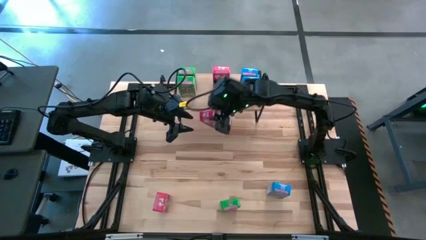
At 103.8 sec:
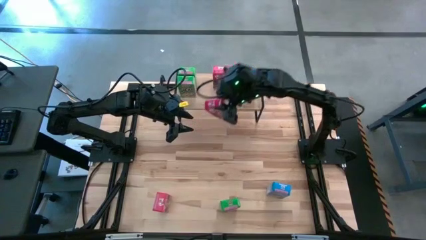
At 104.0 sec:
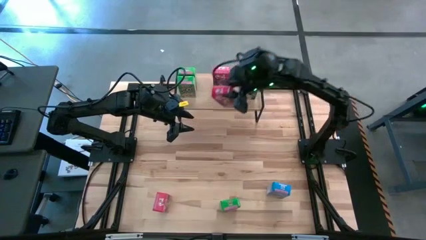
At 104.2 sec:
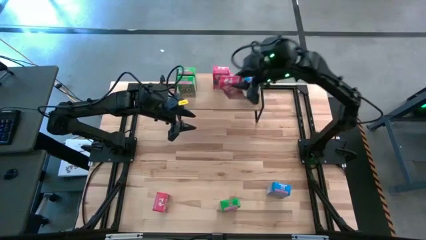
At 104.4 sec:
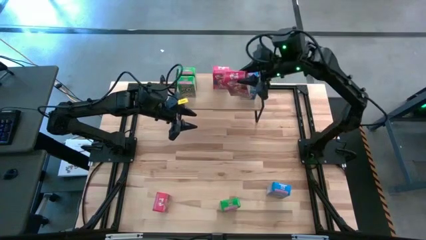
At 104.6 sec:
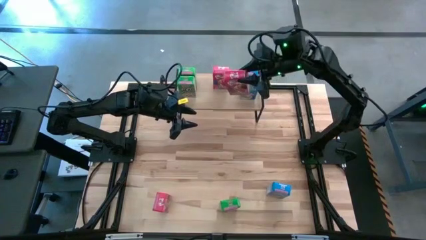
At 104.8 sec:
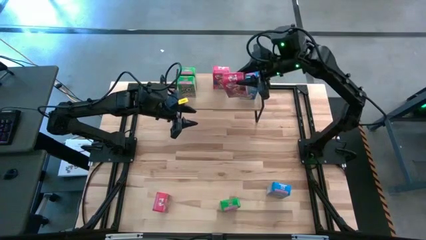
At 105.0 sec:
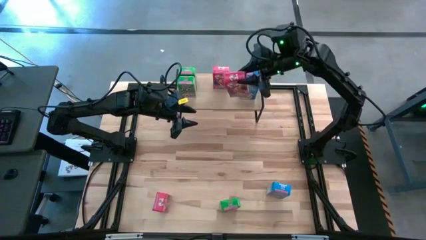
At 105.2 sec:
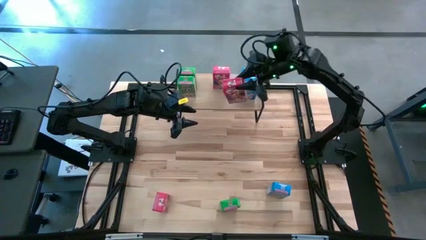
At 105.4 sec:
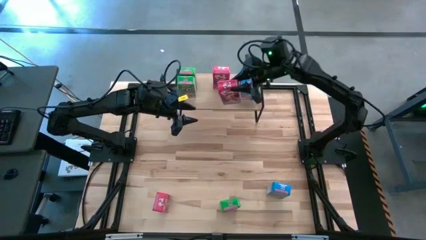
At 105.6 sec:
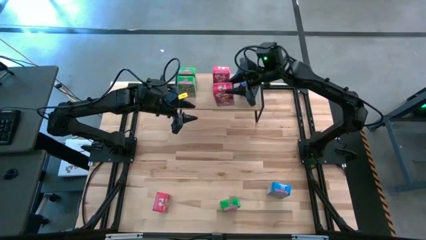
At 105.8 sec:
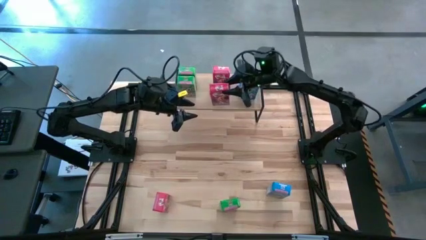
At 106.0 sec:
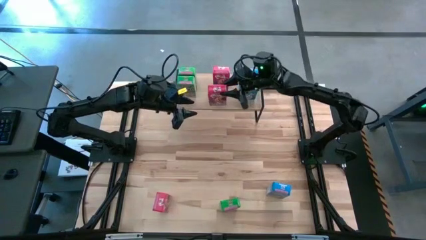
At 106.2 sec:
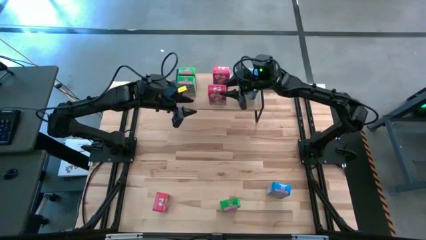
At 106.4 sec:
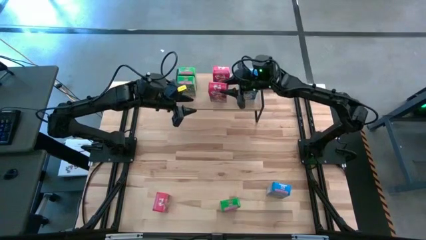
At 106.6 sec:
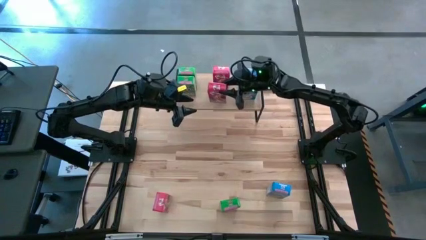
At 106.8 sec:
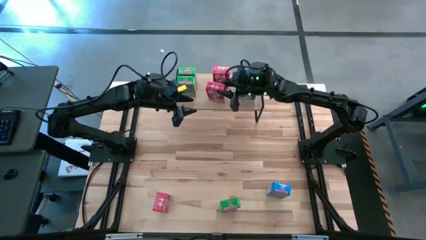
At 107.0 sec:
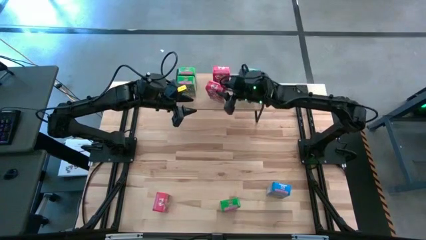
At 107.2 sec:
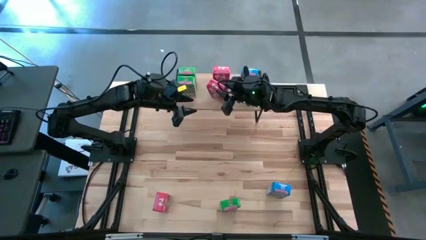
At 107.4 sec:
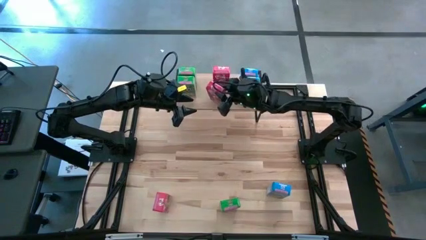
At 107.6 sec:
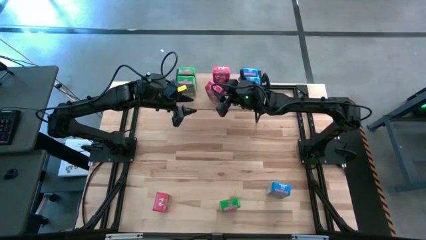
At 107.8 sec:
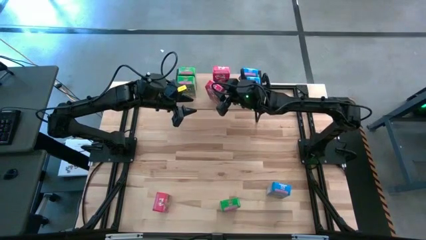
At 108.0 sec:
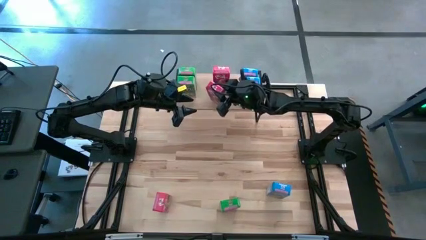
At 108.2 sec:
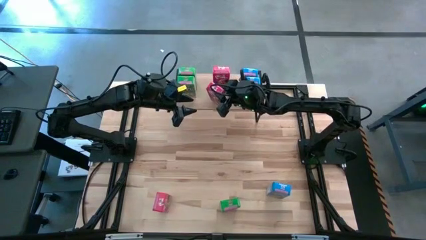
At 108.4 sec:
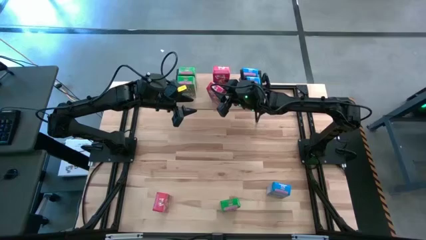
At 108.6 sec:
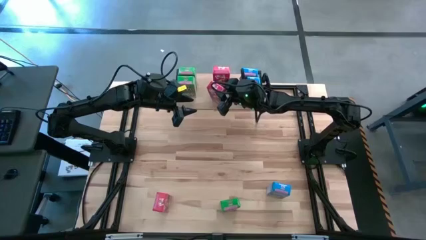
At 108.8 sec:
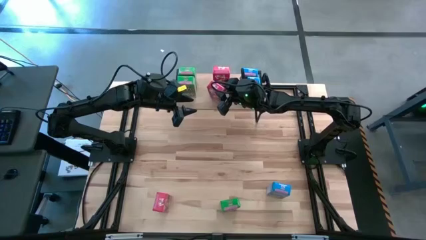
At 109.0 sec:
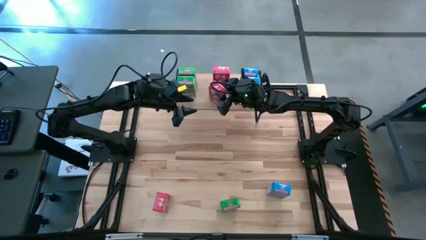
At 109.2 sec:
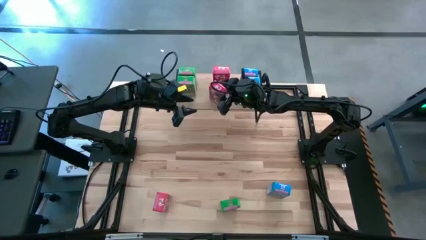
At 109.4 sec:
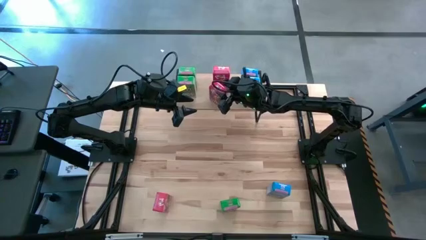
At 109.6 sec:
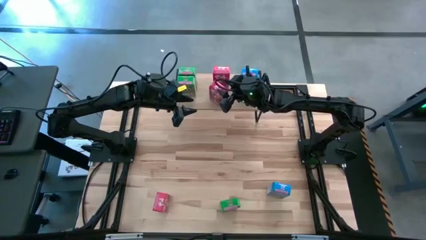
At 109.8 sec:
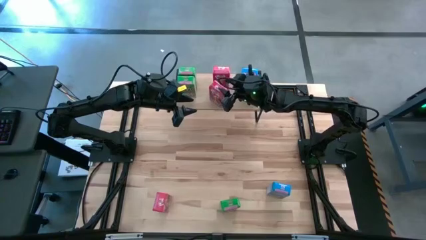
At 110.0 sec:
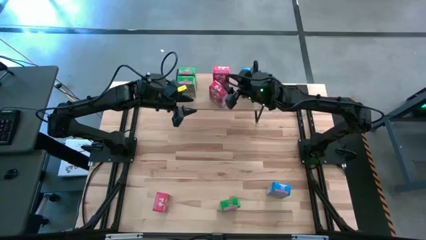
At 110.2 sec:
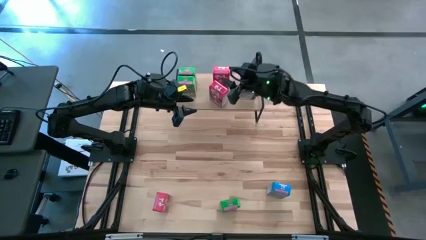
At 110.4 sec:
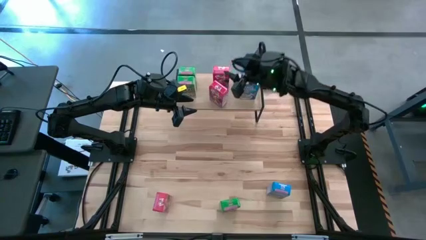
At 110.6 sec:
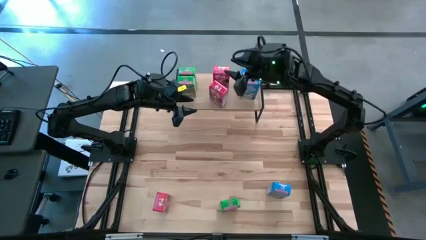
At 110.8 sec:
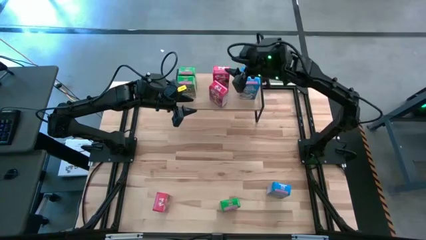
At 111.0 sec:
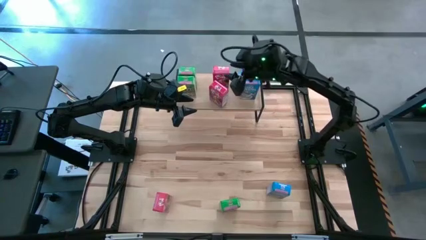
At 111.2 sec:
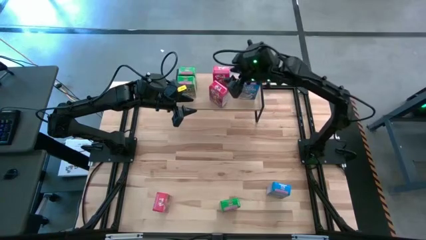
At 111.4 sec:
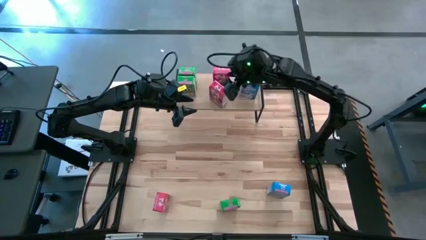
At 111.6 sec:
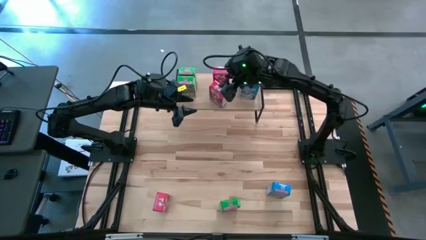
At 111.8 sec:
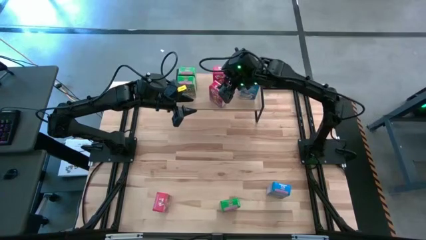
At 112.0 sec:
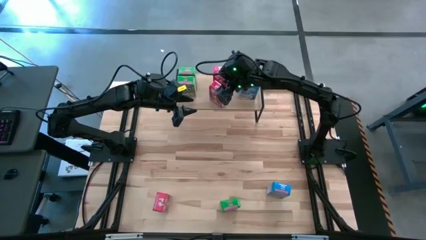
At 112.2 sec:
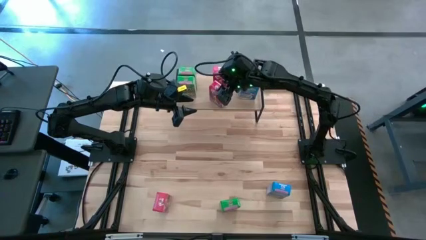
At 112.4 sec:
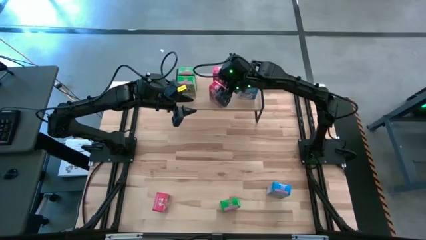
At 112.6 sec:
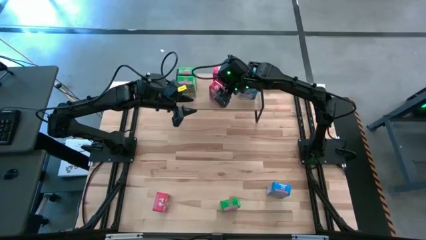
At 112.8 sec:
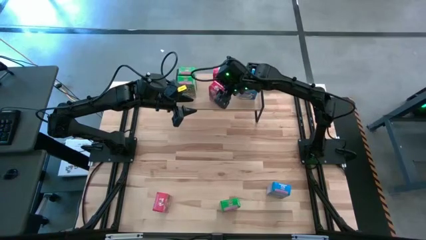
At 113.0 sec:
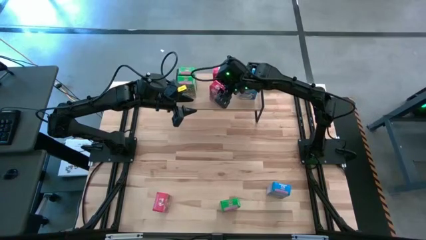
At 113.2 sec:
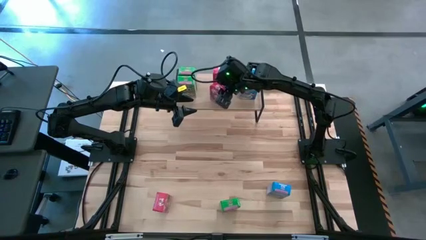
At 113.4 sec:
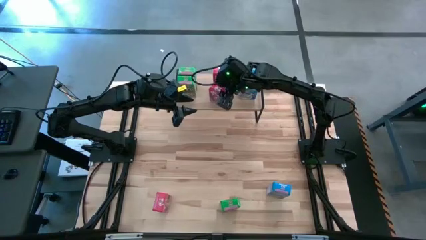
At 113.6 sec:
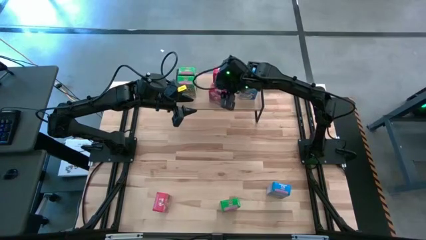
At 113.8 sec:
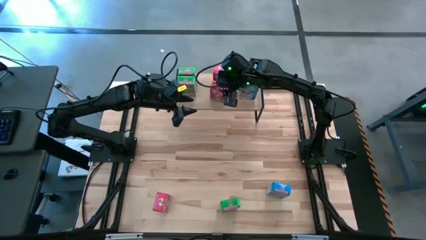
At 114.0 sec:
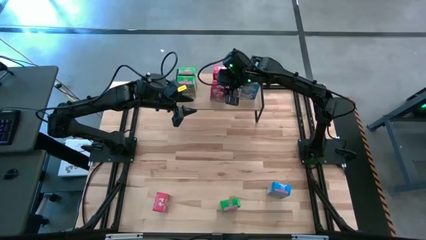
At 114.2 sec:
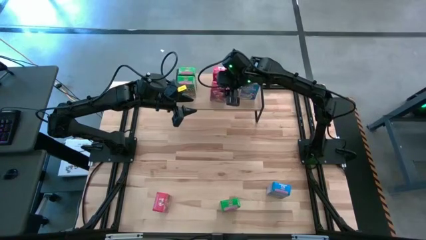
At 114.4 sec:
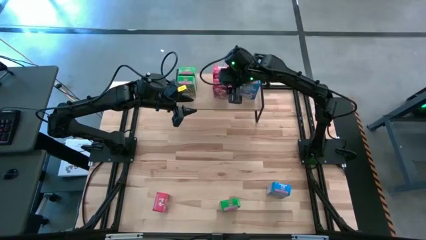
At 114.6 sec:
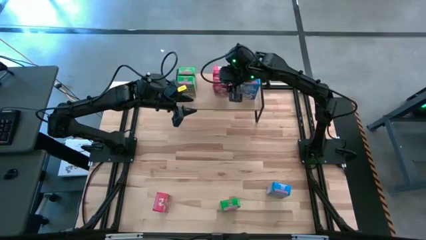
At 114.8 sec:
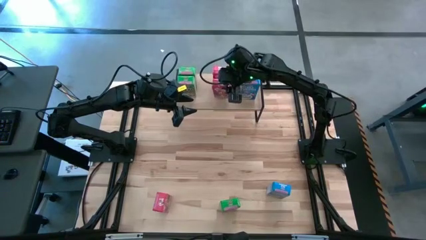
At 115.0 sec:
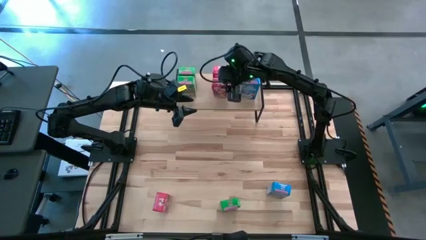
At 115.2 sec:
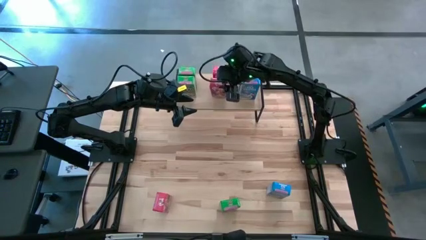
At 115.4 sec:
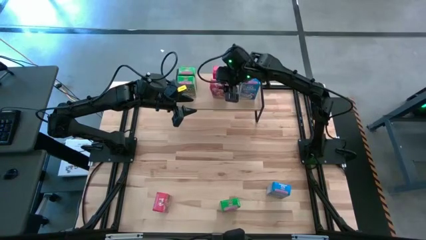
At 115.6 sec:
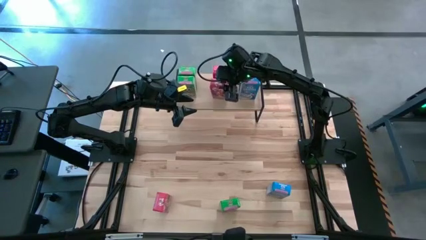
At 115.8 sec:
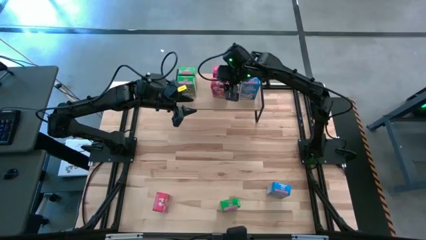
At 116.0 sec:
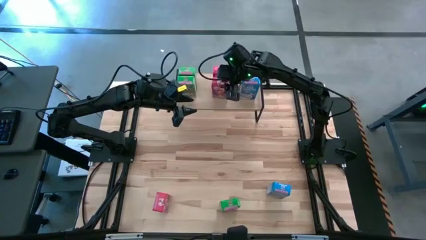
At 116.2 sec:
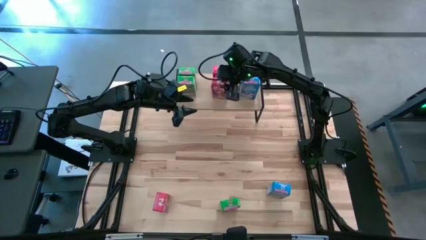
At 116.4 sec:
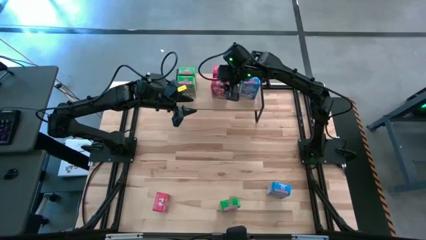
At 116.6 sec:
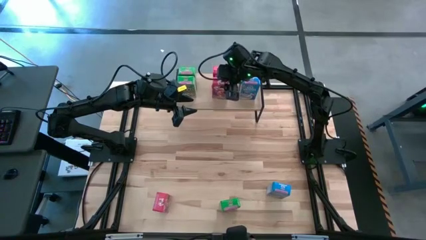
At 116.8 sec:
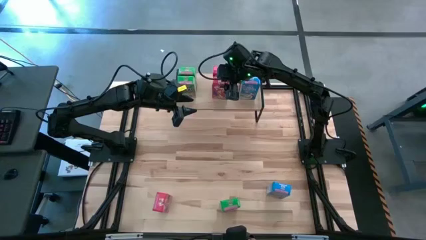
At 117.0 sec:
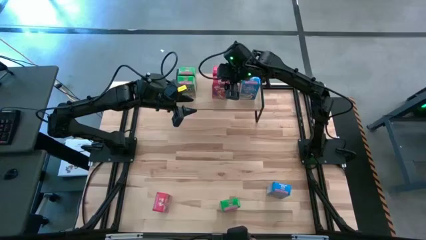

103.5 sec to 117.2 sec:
Task: Stack cereal on shelf
Put the top red cereal box on the shelf aligned with the other red cereal box
